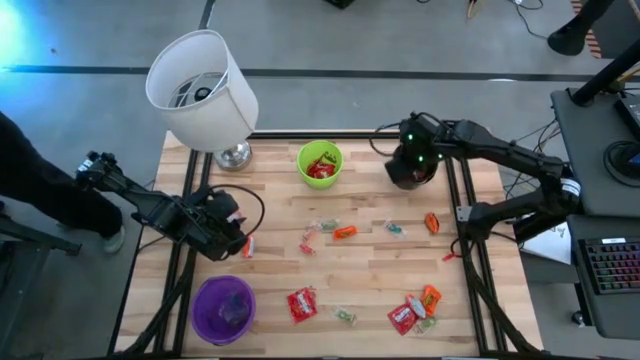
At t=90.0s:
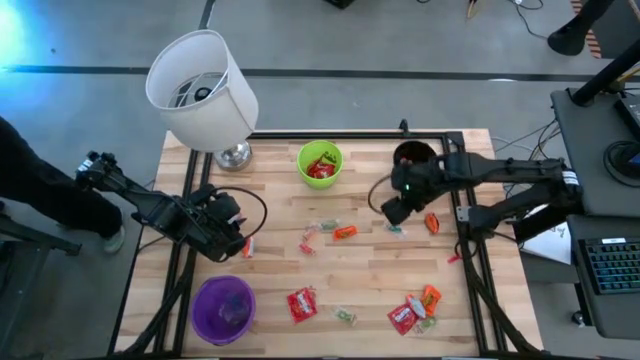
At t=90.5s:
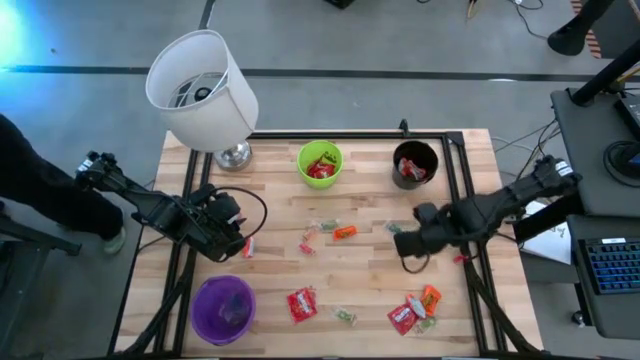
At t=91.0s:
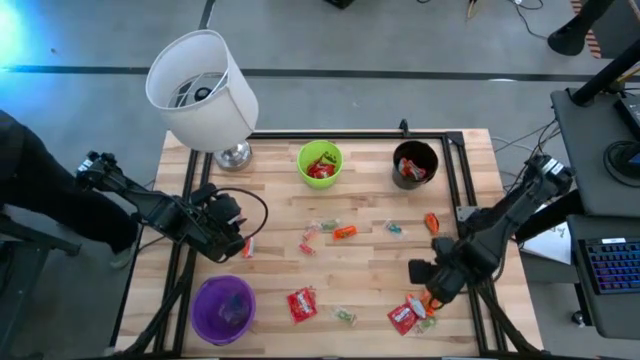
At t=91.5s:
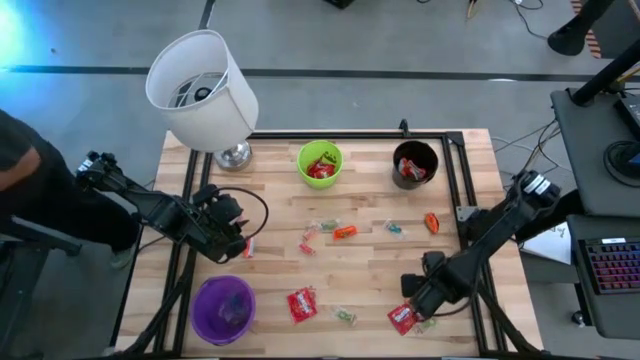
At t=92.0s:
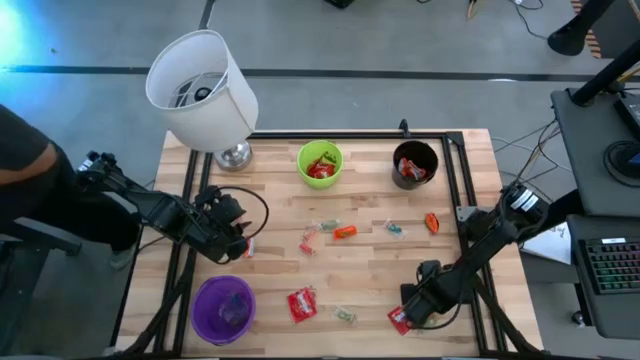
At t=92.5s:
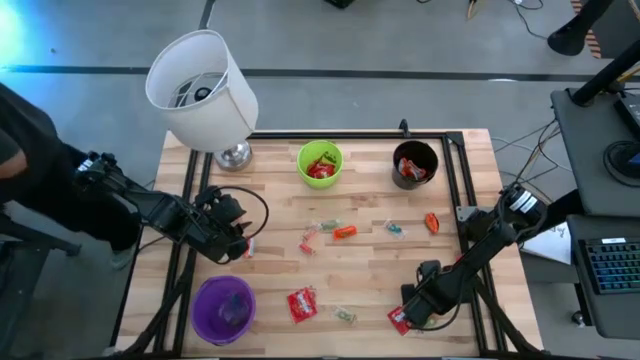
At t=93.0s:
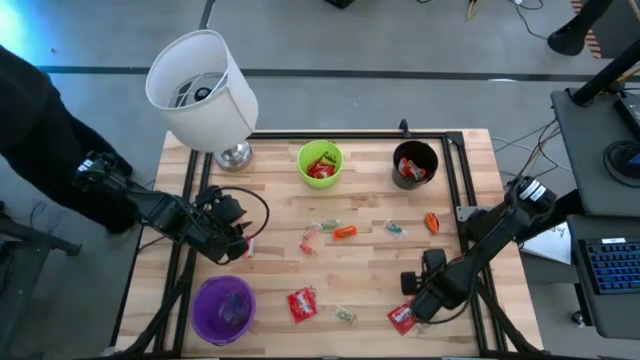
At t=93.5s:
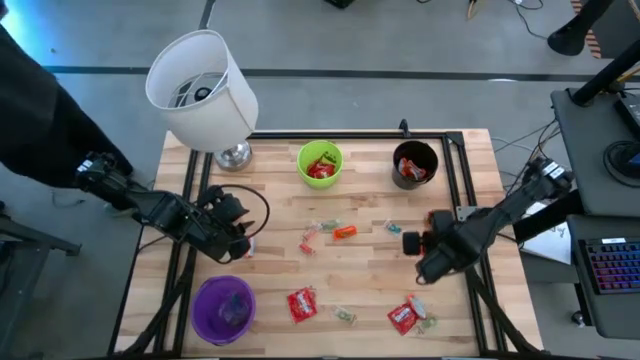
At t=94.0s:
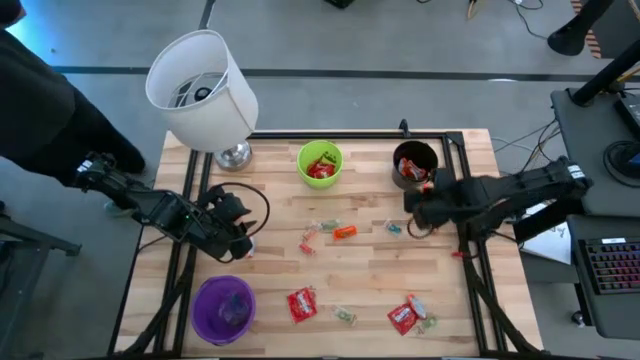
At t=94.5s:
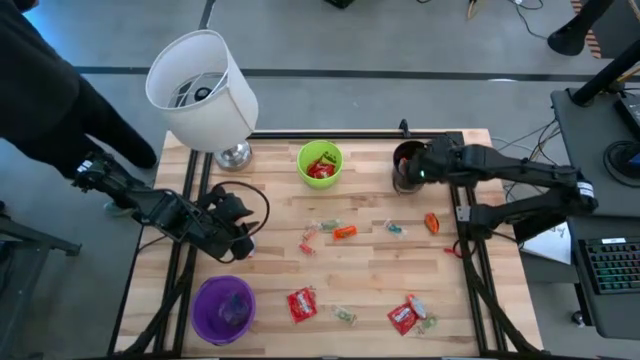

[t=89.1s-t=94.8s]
Task: Sort candy
Put the orange candy into the black bucket

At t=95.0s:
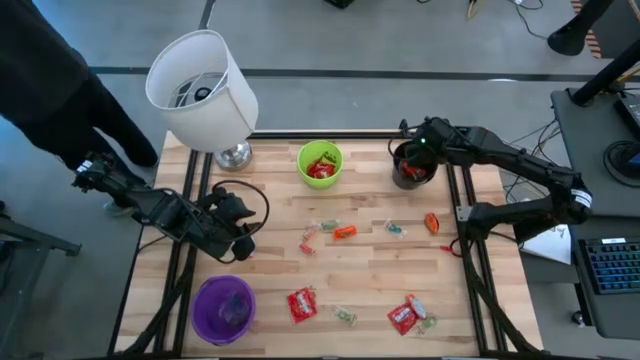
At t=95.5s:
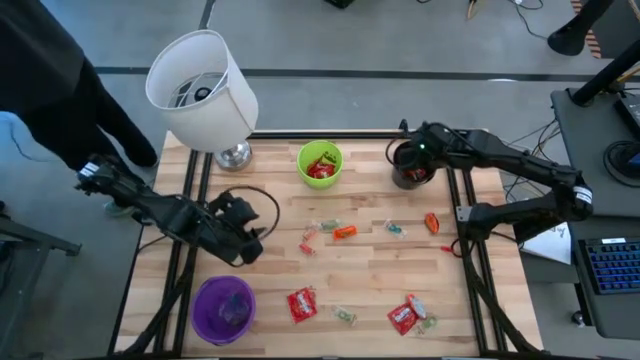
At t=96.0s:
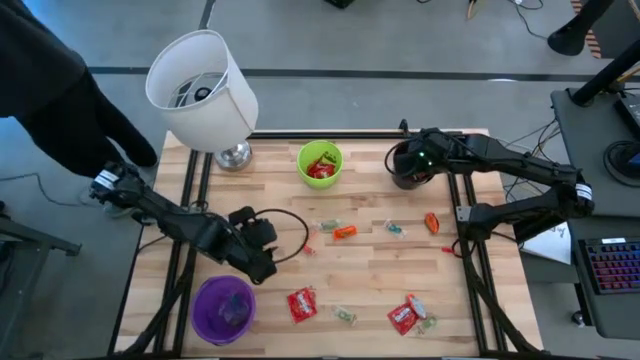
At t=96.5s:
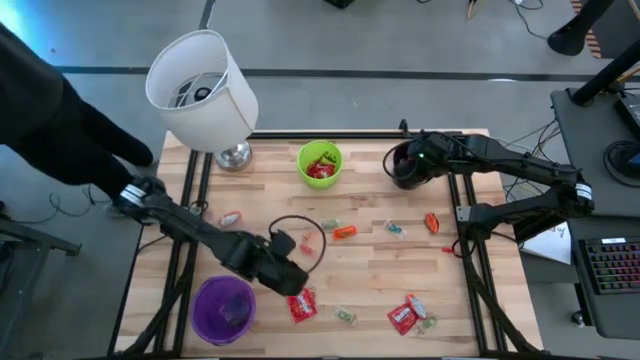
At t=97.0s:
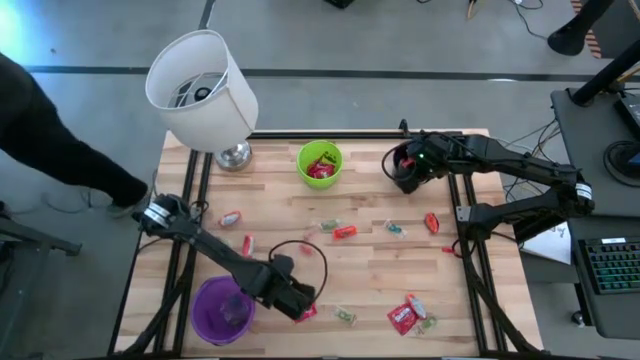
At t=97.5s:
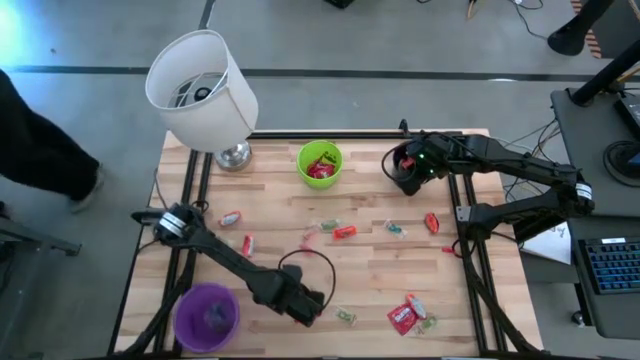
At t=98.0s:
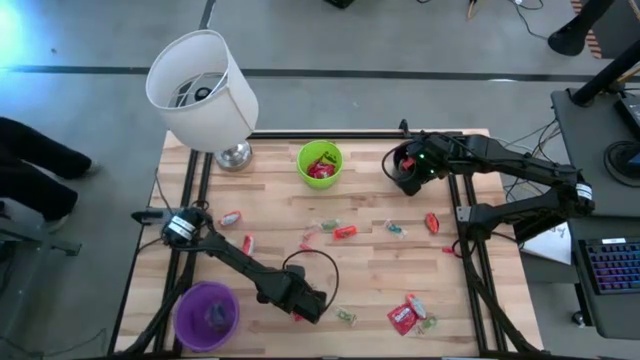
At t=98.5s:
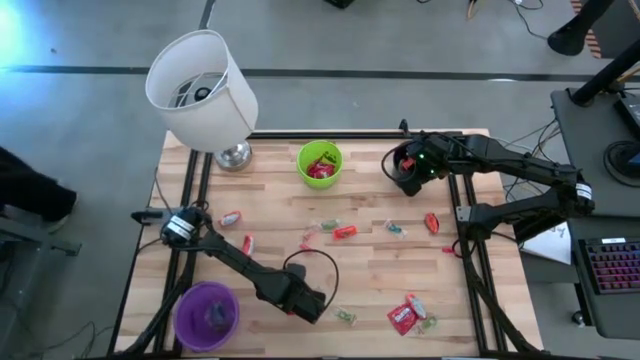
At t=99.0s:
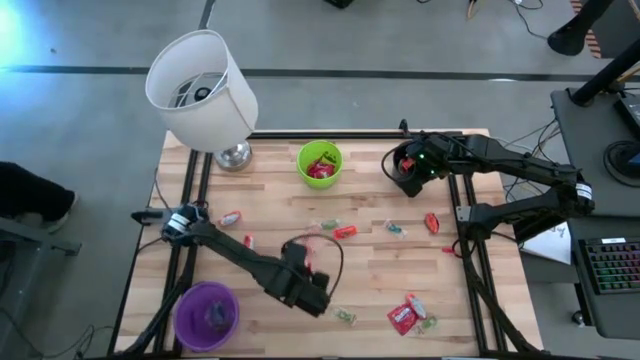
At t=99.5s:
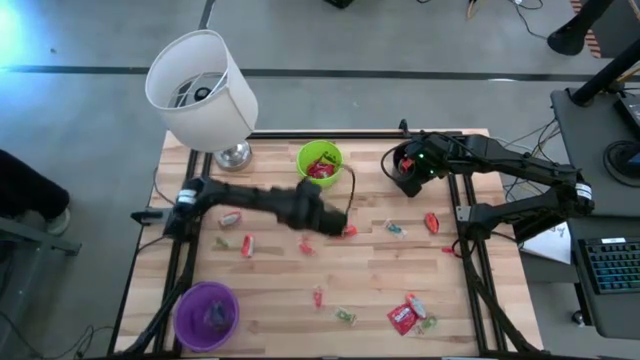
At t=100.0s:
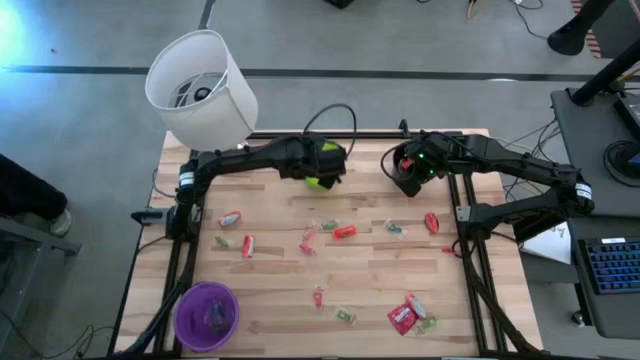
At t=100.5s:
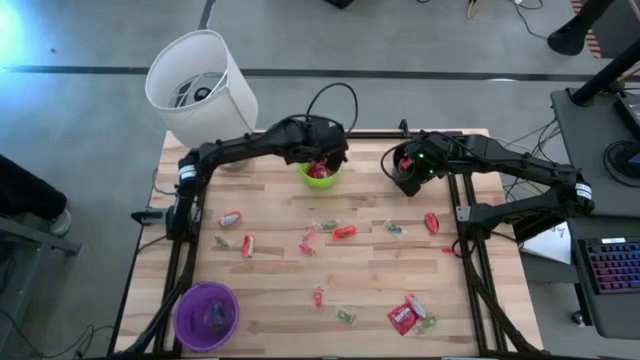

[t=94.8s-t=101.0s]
Put the red candy into the green bucket

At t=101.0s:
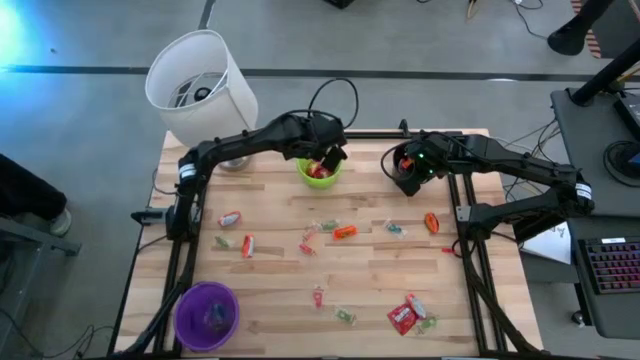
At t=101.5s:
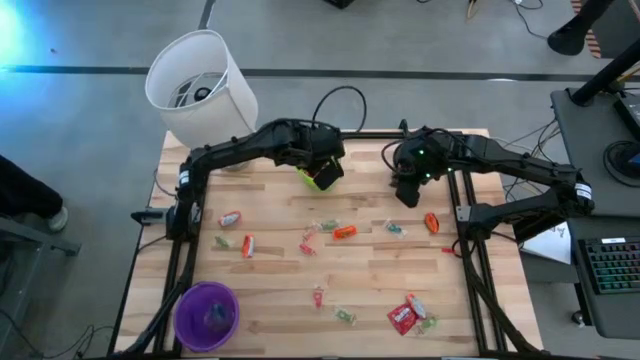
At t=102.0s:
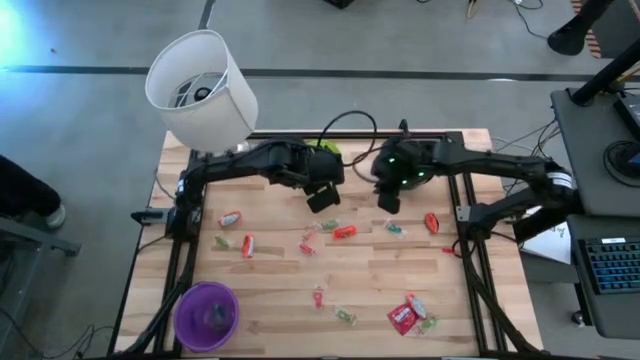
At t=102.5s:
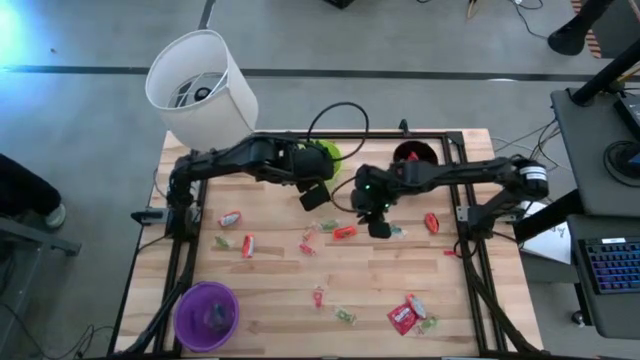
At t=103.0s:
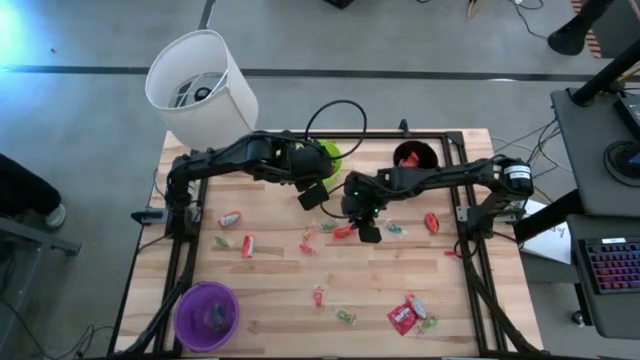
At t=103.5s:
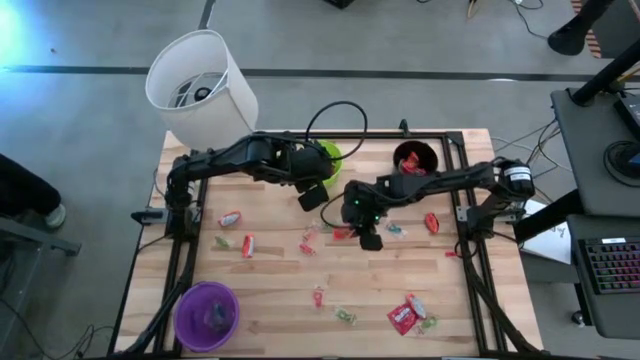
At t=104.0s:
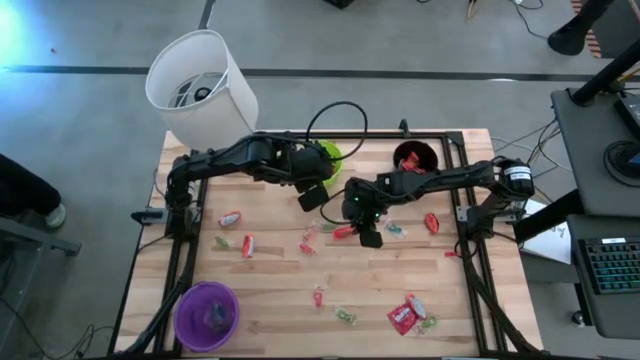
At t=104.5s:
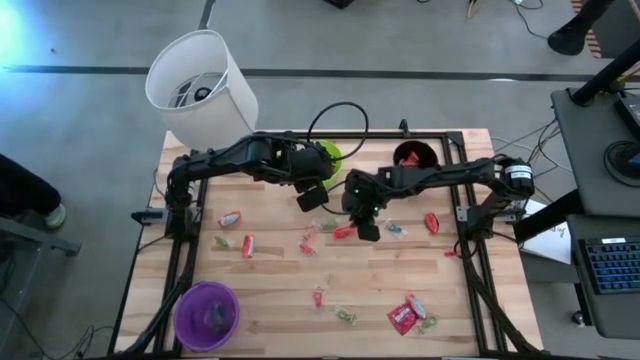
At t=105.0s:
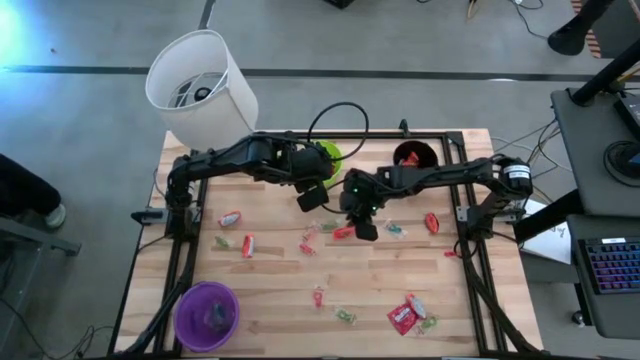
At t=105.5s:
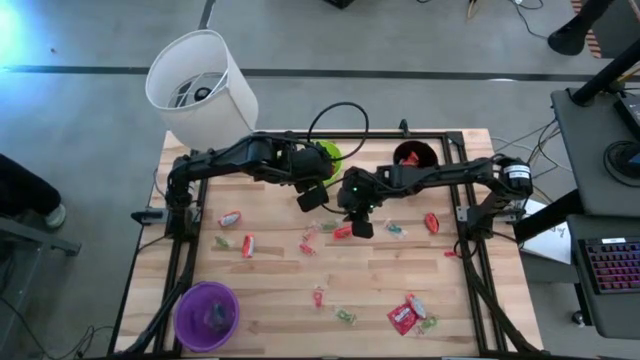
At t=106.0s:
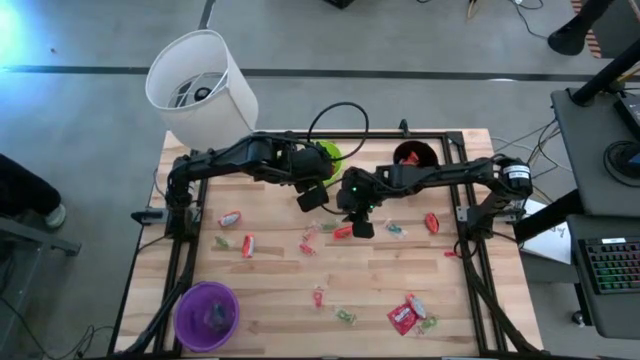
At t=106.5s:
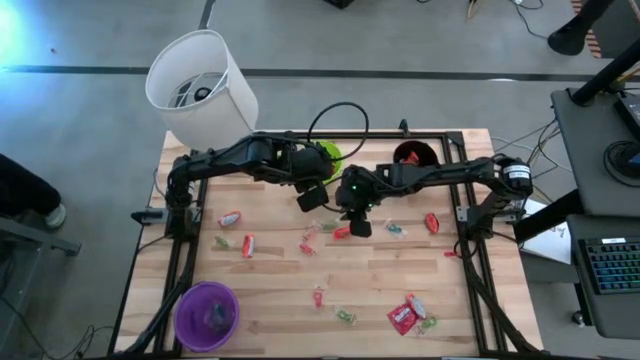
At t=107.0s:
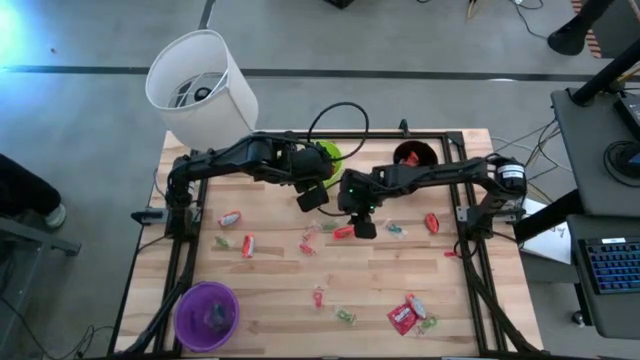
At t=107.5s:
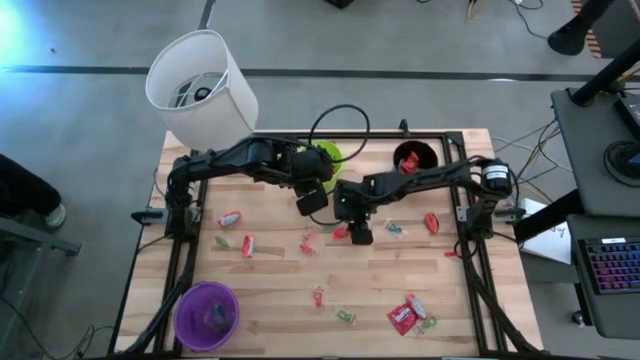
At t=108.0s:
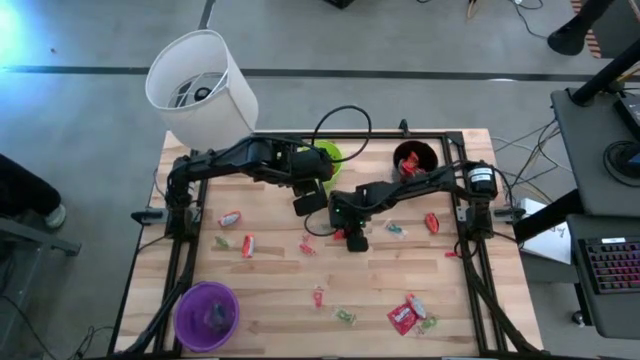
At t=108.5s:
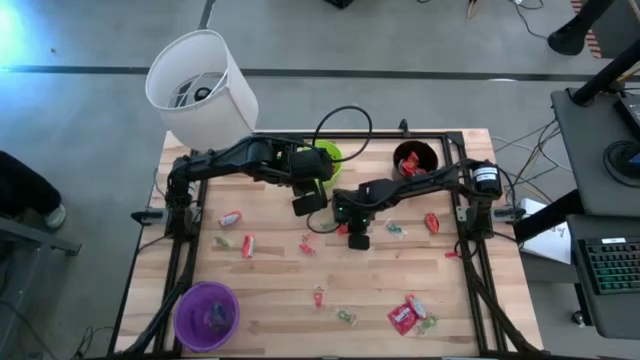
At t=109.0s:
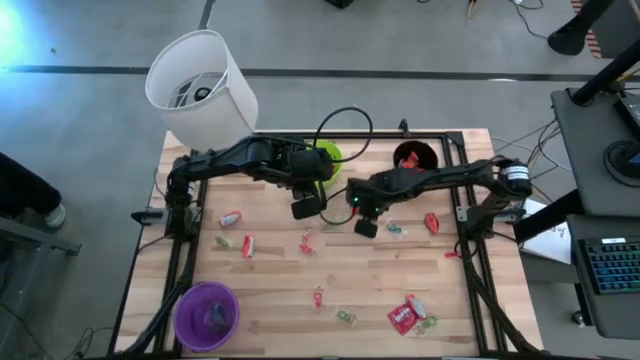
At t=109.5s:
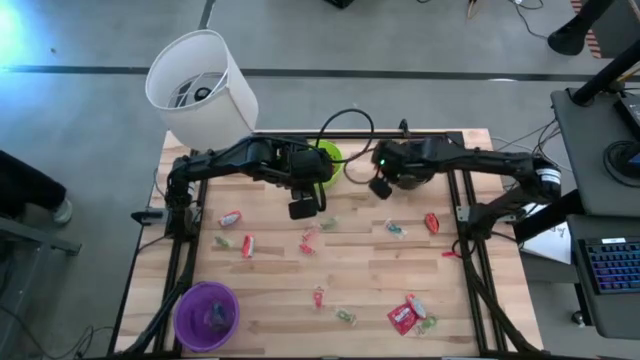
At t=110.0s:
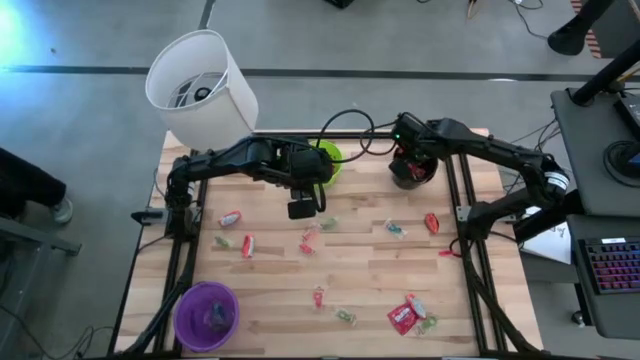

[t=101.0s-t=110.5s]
Put the orange candy into the black bucket
